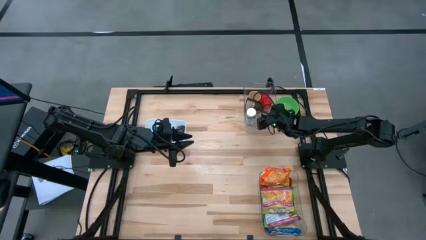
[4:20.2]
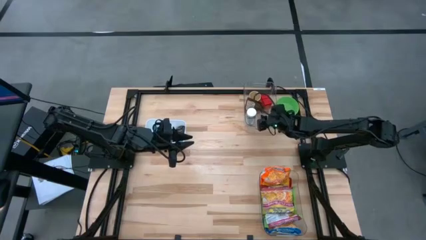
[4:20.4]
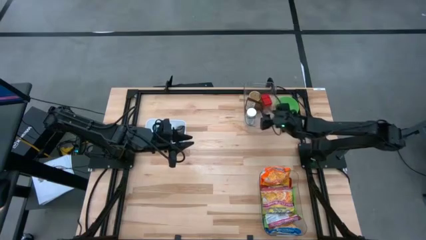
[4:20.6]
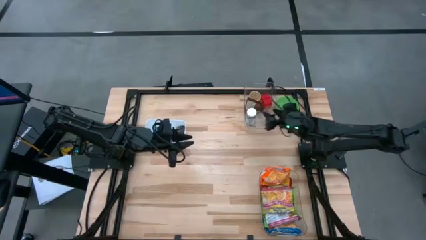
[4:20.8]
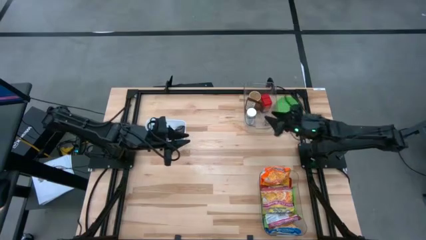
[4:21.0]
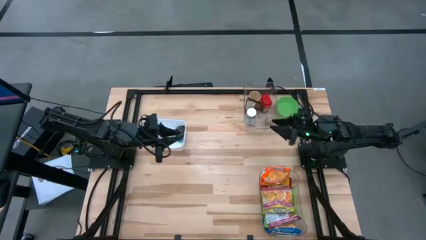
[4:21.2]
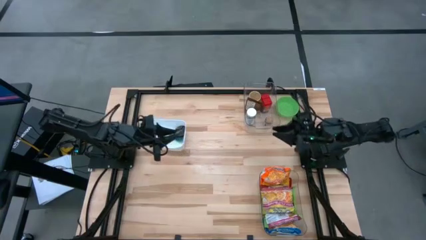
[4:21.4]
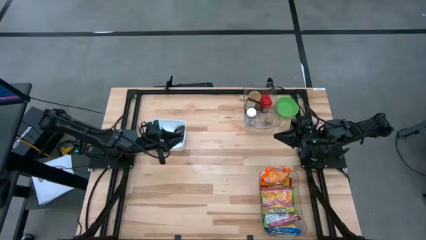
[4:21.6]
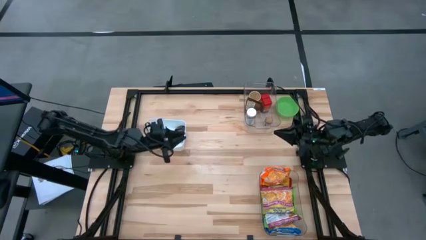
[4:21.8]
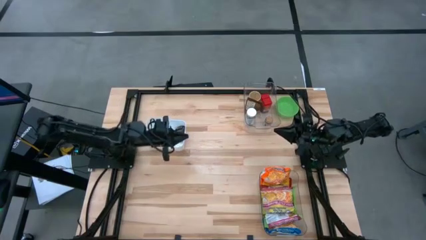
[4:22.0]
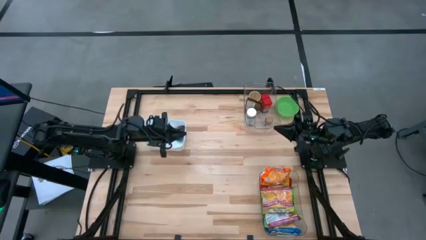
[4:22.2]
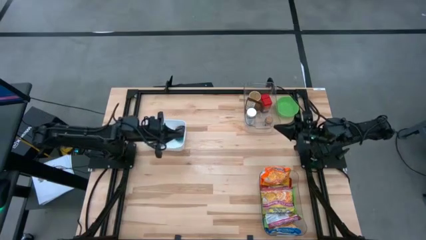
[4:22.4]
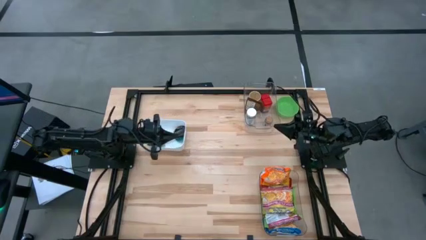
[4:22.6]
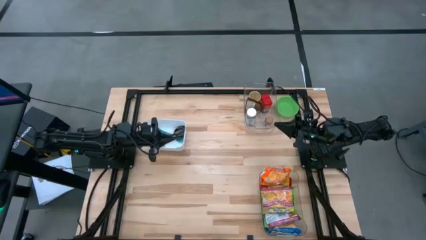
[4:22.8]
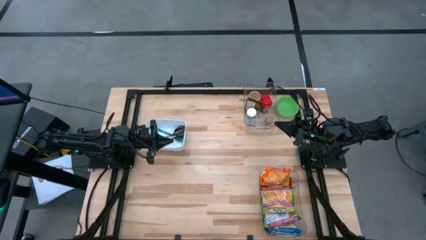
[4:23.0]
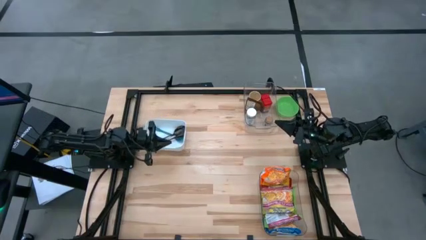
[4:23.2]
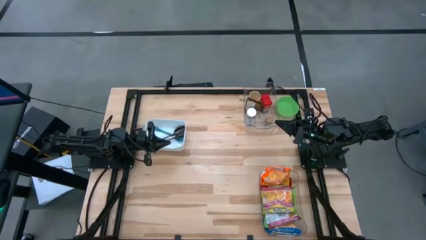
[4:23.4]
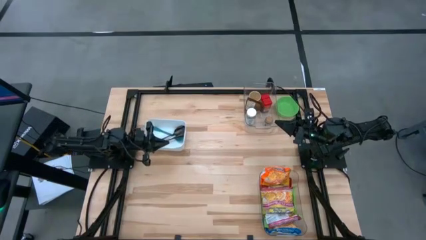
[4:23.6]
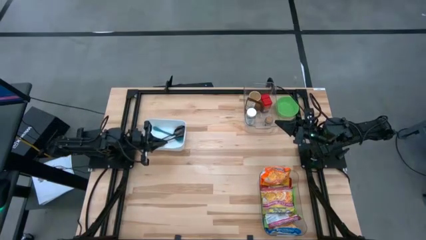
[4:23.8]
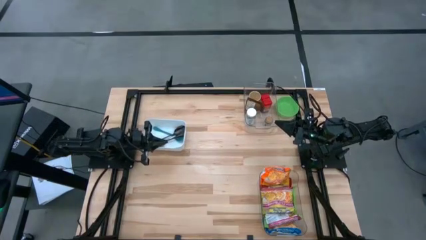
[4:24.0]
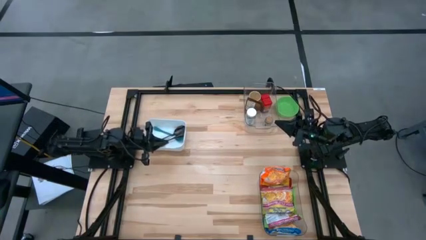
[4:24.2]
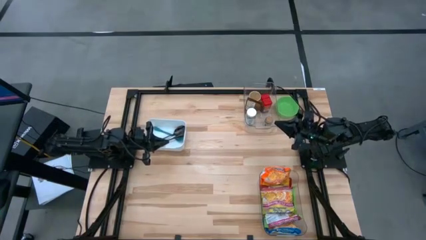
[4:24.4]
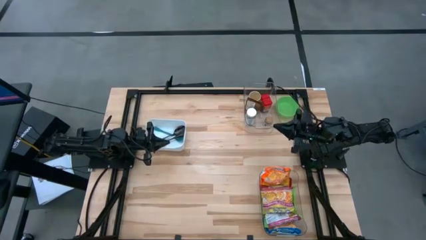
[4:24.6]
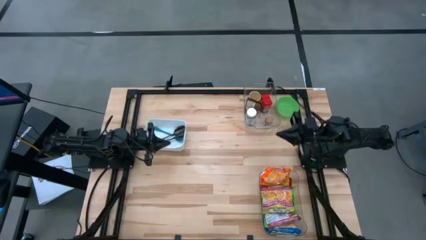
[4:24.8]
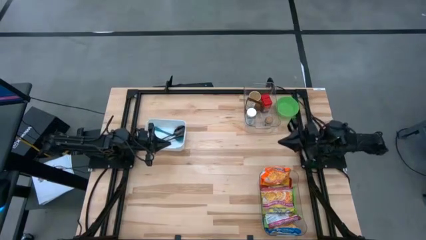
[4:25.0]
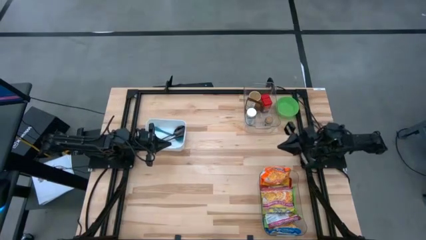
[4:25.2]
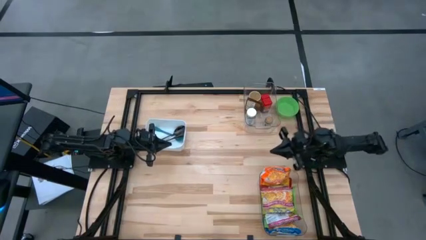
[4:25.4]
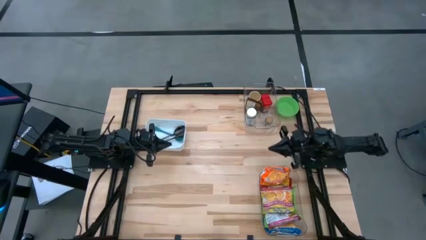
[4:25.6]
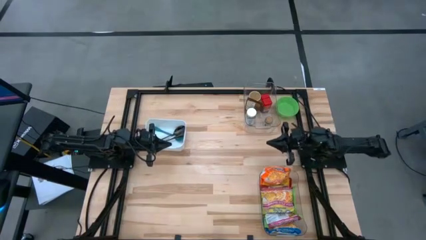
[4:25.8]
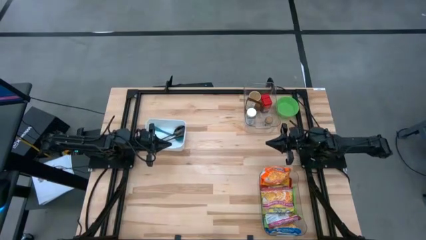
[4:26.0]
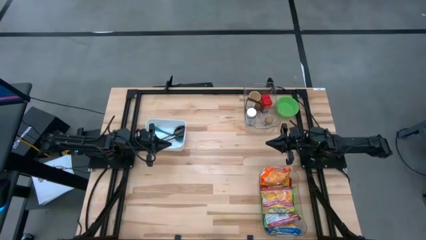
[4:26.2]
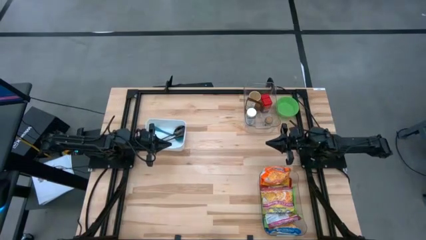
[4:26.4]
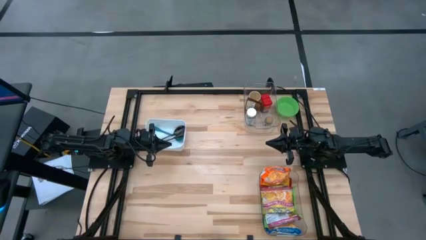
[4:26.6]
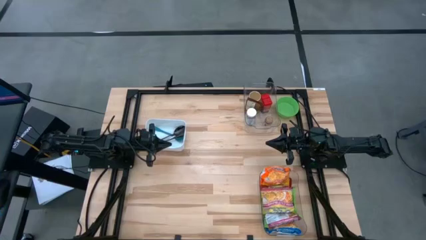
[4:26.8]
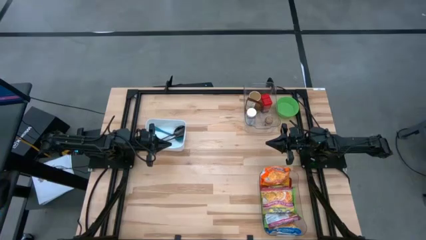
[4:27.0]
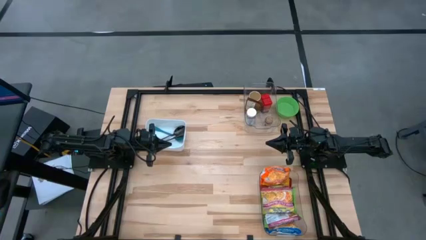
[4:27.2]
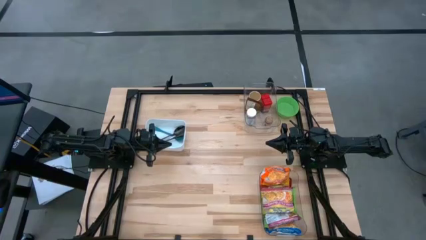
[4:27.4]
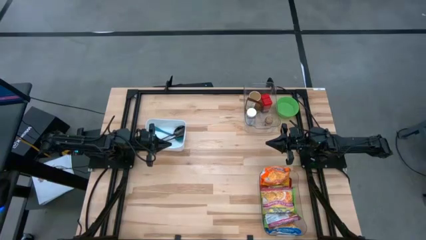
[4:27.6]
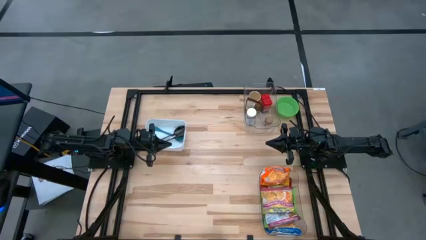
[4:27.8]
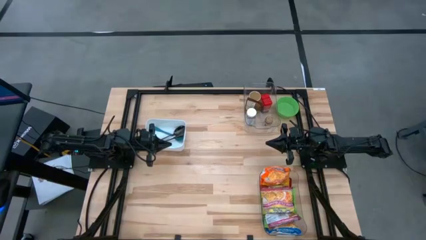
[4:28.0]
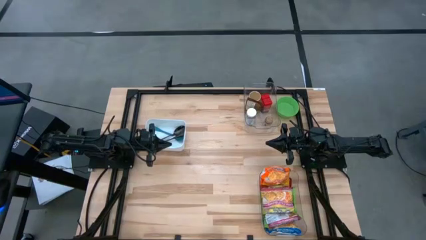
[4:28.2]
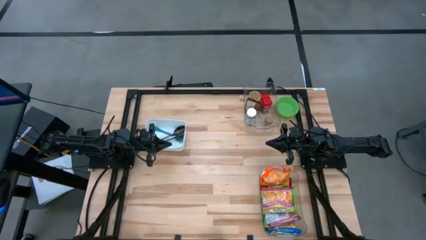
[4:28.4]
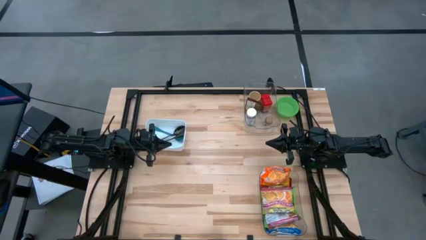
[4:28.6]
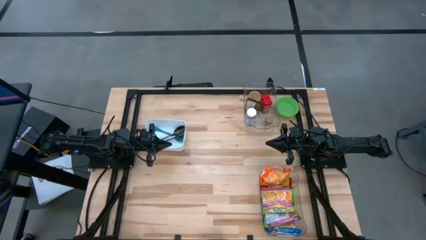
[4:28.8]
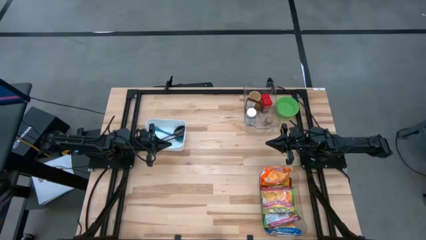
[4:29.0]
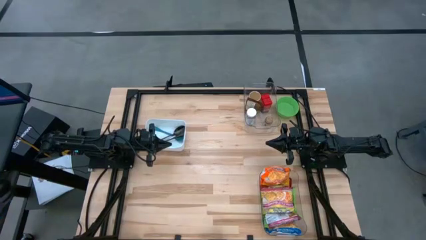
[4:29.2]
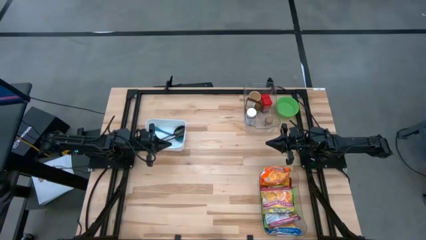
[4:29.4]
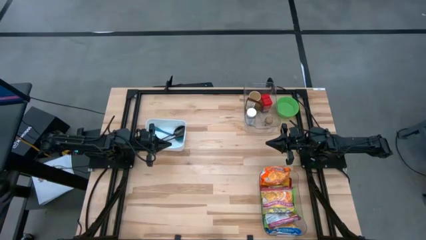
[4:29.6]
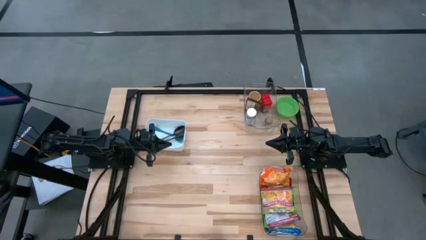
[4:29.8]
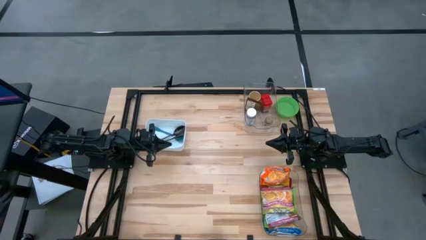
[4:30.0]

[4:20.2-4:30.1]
Task: Pick & Place Food Item
Return to Home Position

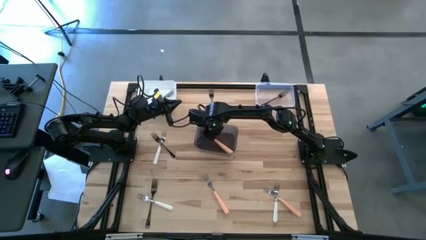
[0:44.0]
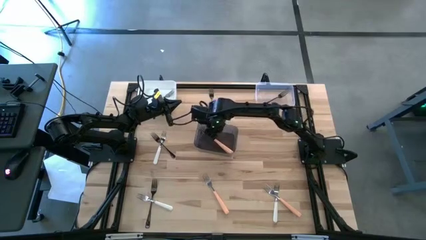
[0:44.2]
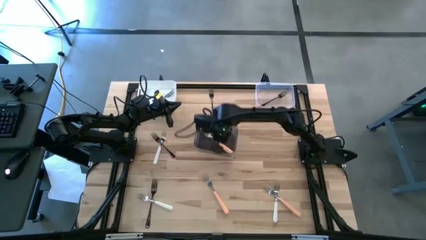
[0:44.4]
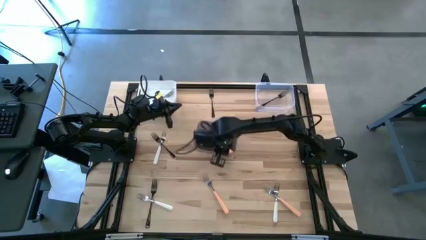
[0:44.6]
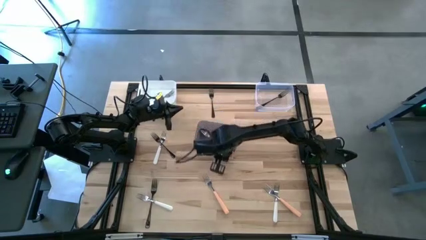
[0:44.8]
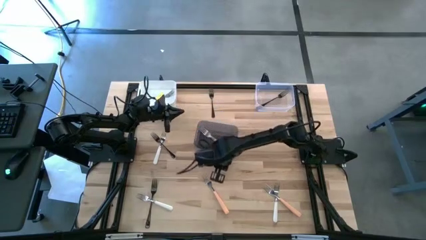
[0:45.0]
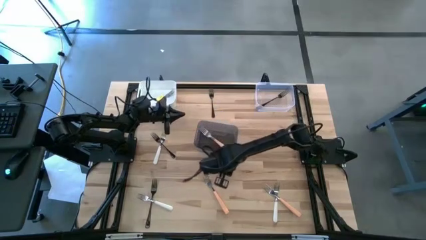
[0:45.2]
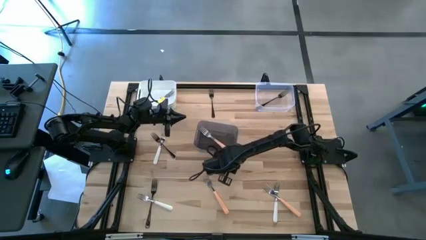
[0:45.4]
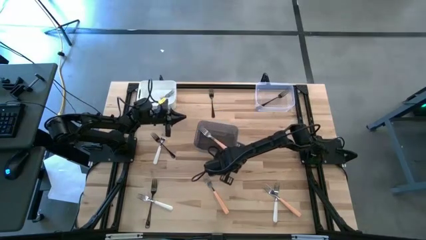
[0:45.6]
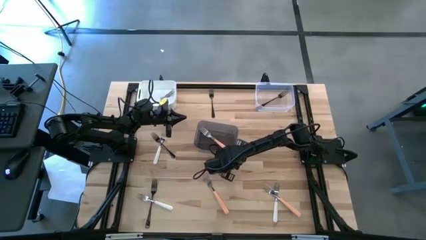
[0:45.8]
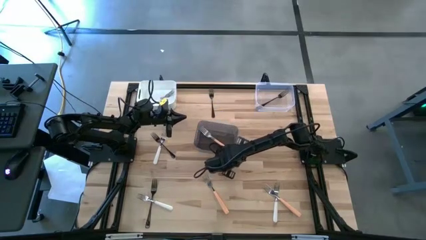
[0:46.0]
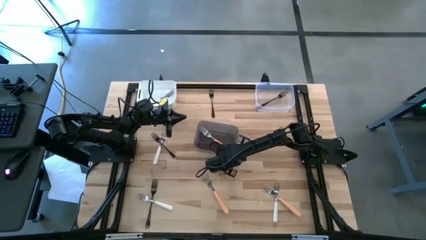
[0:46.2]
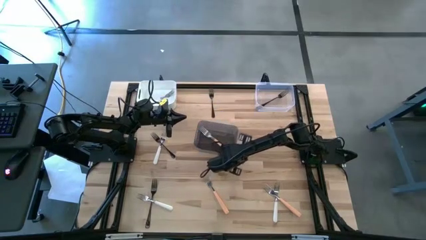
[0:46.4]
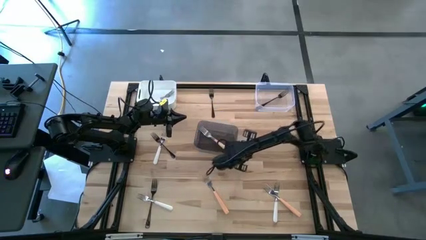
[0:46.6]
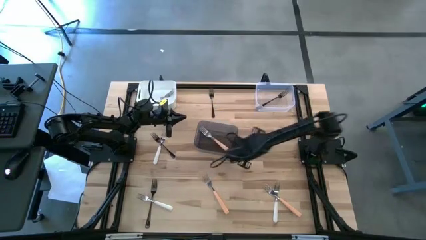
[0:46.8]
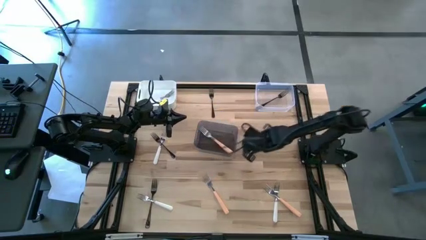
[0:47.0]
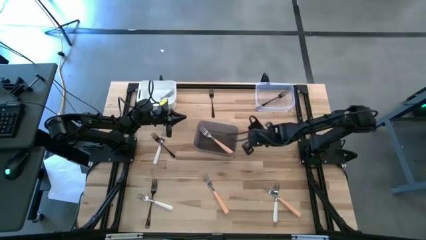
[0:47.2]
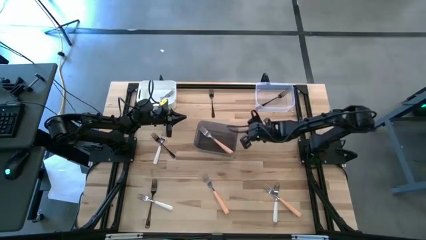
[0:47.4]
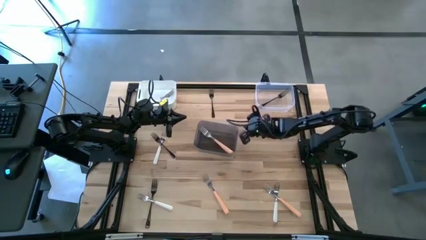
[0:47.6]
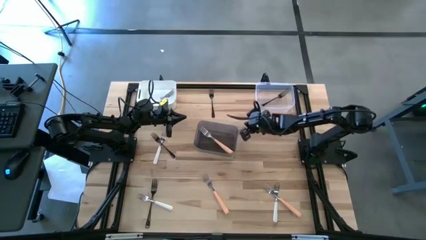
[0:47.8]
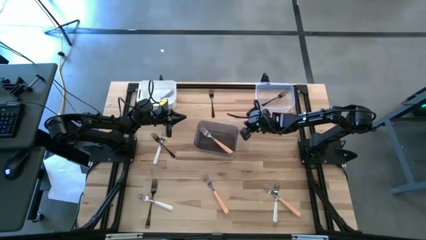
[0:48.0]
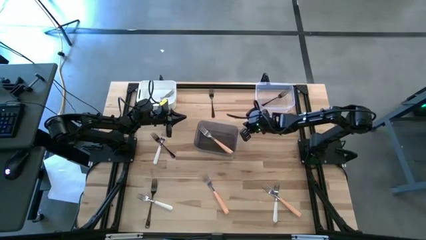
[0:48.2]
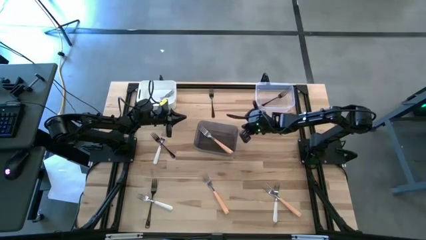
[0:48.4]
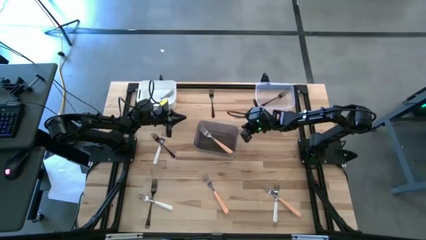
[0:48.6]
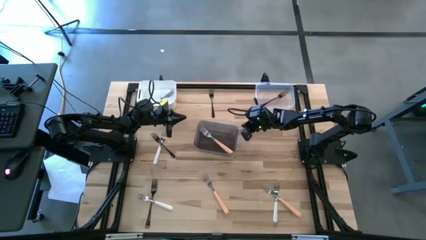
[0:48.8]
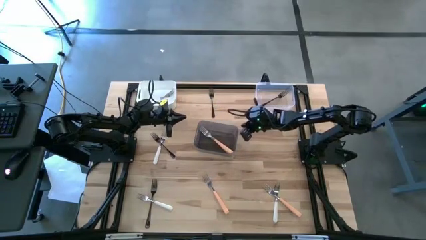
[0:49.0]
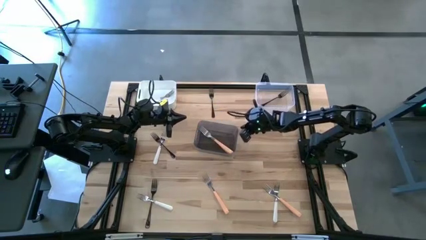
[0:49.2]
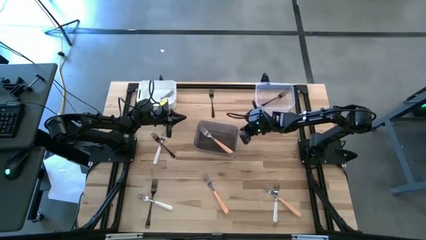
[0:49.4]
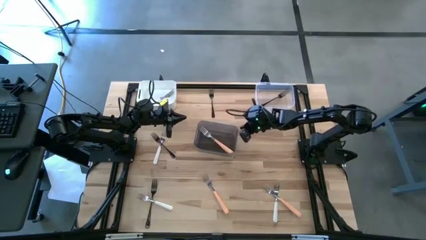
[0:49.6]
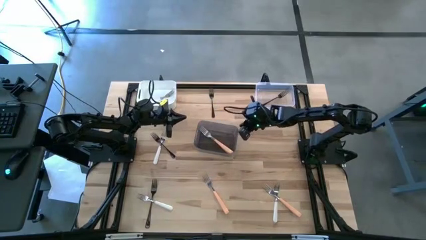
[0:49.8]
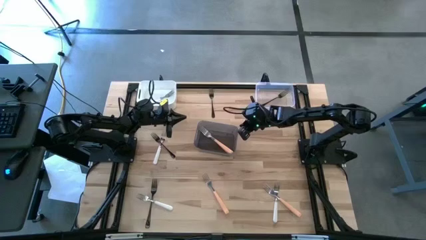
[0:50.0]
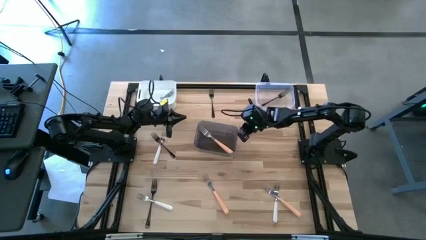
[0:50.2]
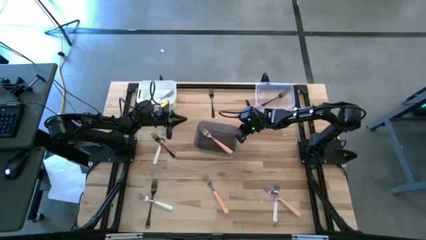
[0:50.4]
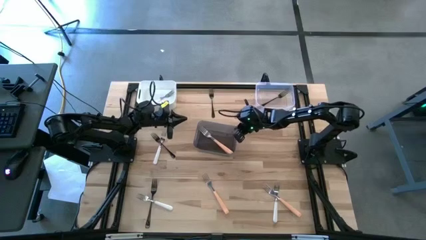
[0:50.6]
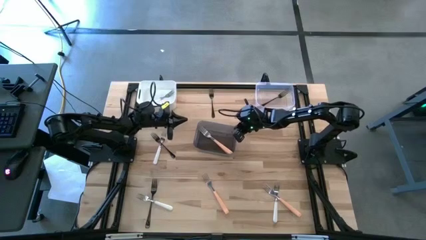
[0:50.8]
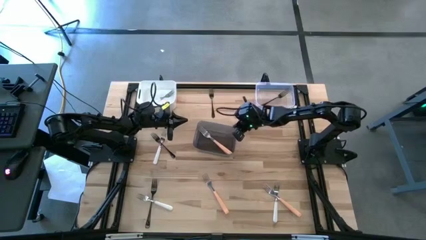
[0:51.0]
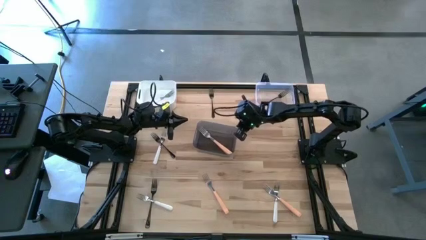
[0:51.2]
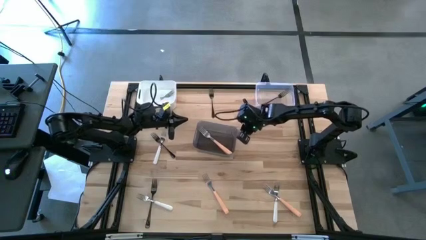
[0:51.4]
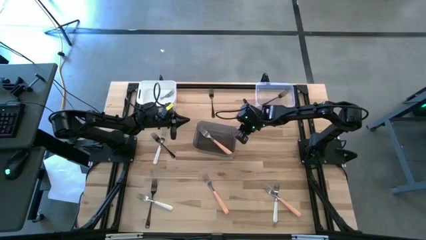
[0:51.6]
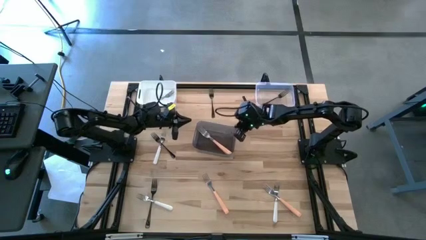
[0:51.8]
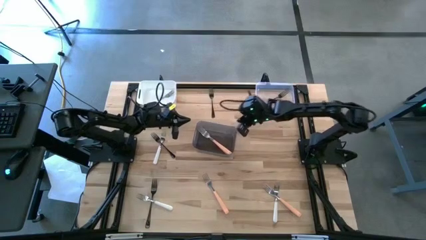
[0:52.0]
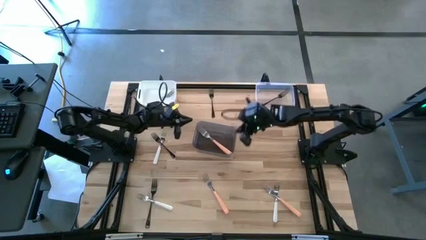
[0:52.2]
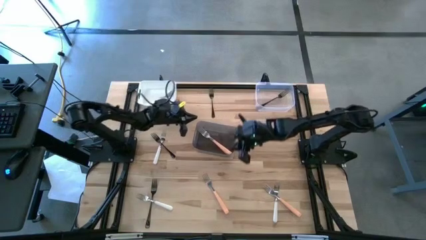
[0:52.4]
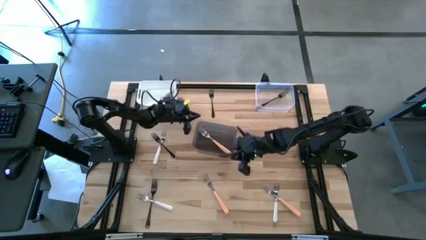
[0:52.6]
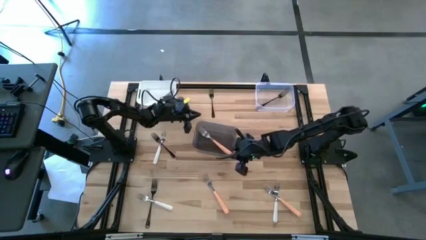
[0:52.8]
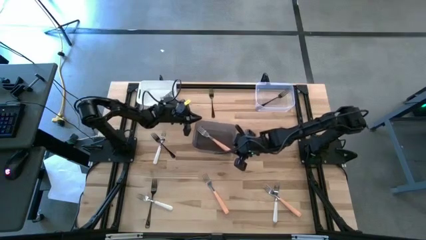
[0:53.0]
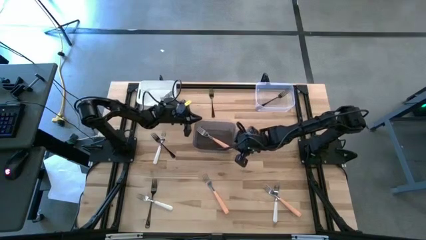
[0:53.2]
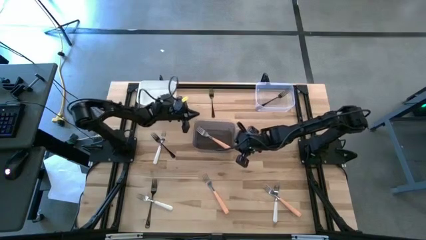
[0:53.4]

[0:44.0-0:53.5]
Task: Sort silverware by color (type)
Adjust the black bin in the middle
